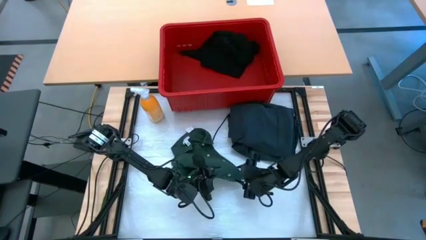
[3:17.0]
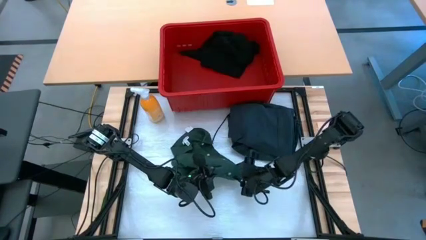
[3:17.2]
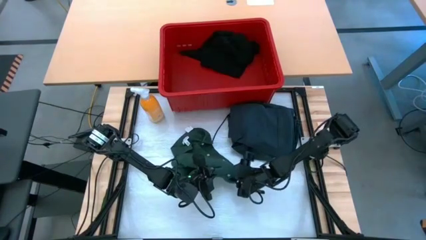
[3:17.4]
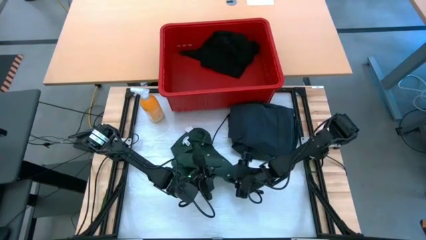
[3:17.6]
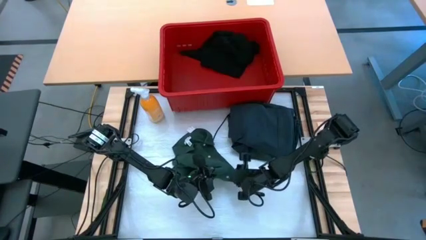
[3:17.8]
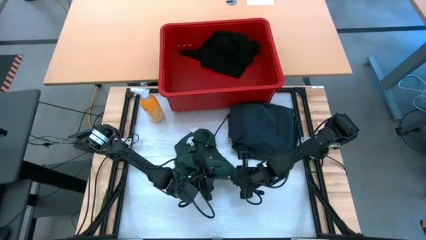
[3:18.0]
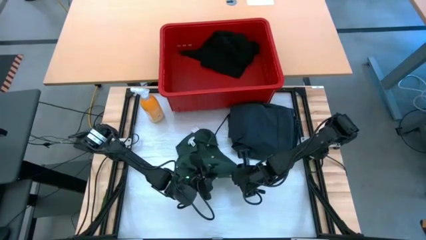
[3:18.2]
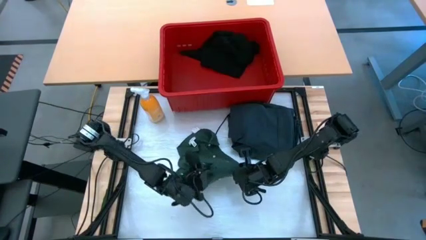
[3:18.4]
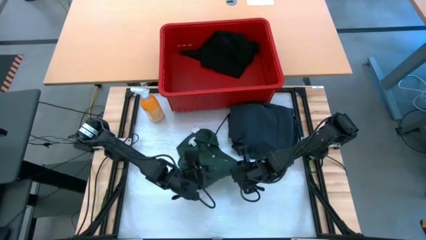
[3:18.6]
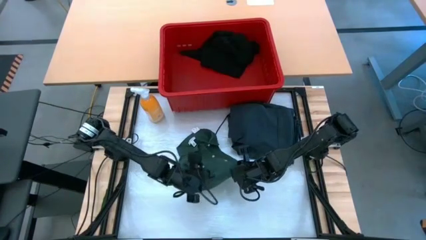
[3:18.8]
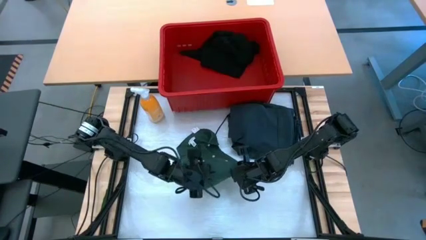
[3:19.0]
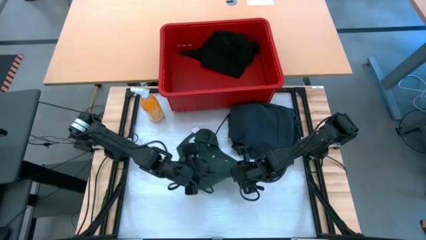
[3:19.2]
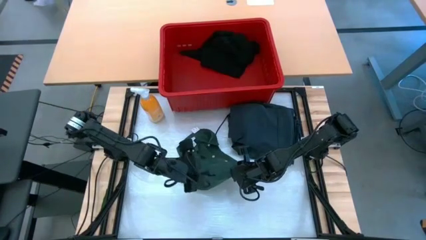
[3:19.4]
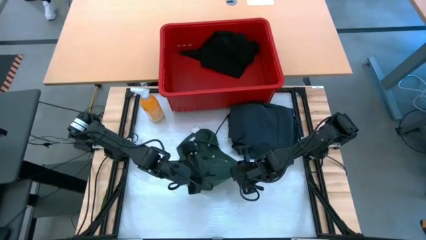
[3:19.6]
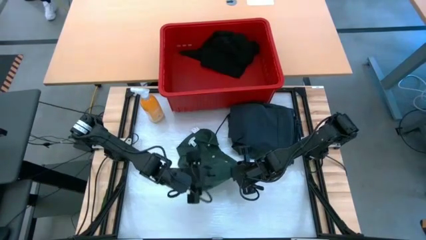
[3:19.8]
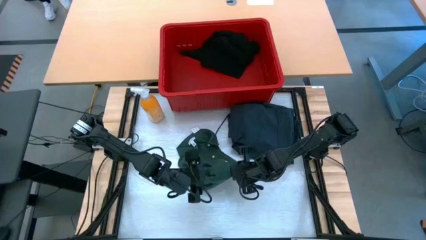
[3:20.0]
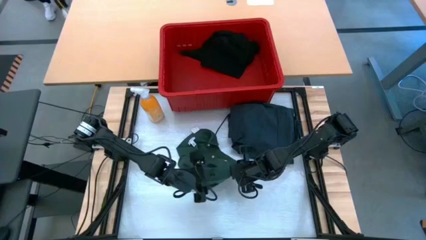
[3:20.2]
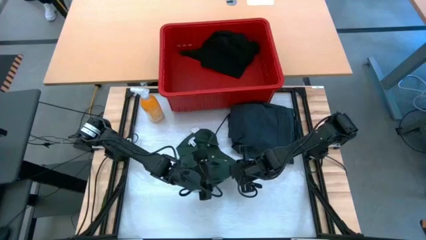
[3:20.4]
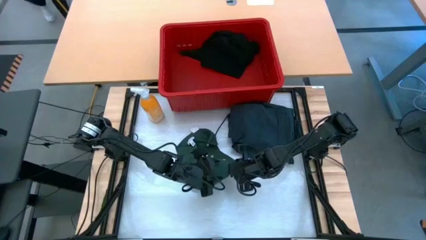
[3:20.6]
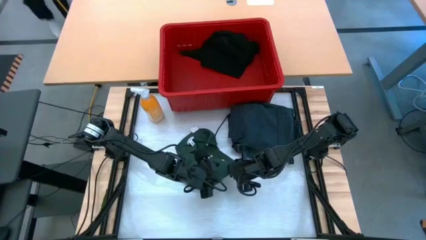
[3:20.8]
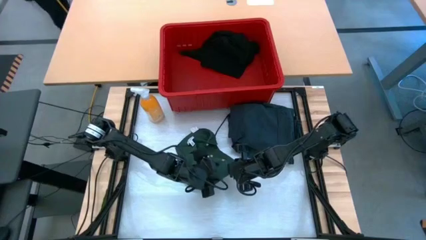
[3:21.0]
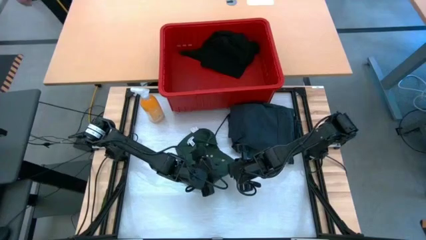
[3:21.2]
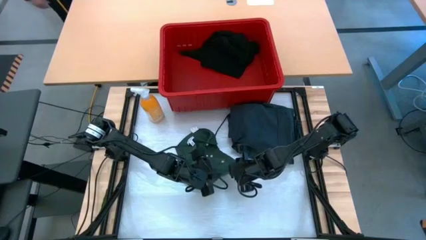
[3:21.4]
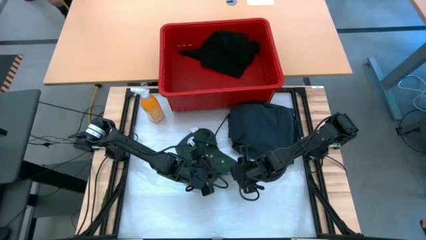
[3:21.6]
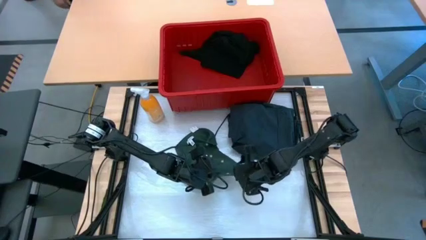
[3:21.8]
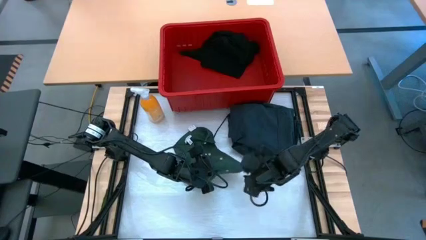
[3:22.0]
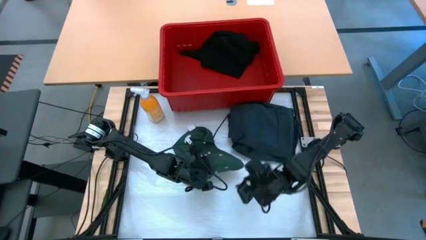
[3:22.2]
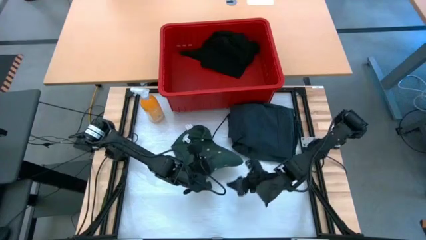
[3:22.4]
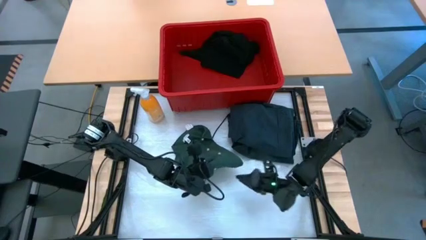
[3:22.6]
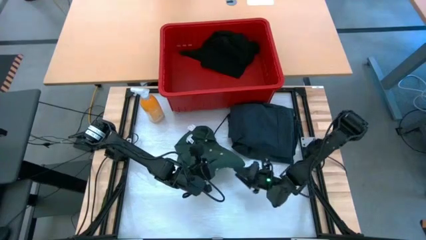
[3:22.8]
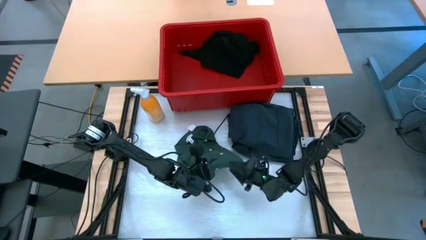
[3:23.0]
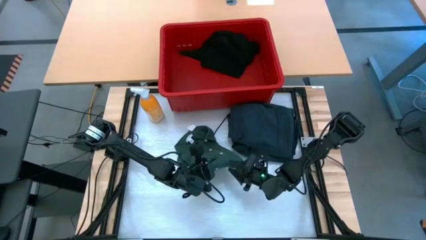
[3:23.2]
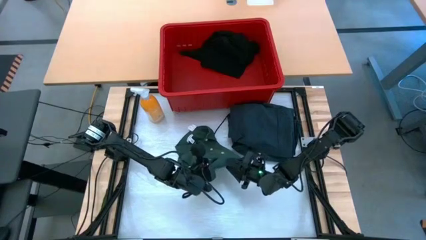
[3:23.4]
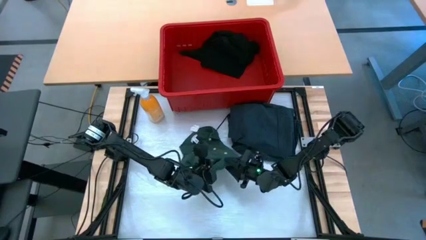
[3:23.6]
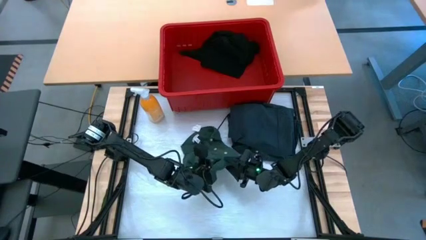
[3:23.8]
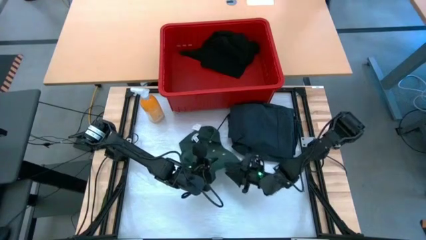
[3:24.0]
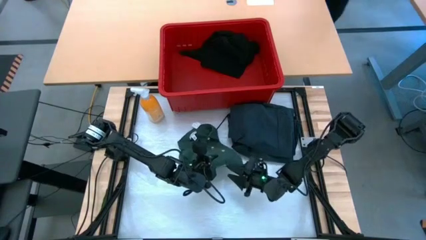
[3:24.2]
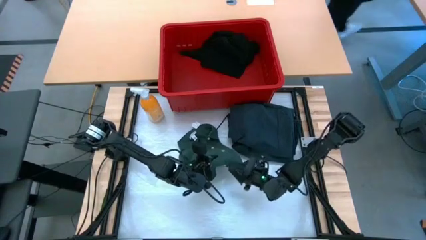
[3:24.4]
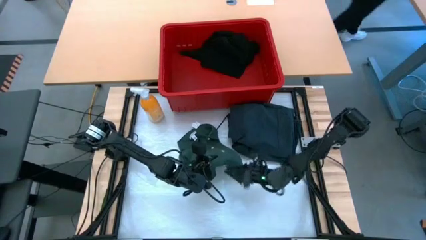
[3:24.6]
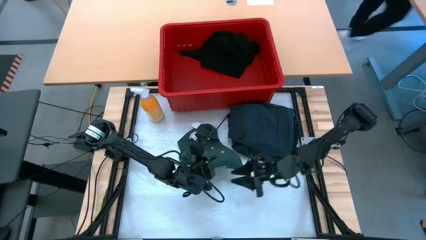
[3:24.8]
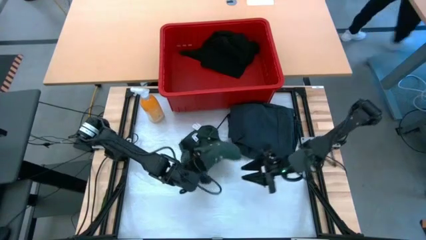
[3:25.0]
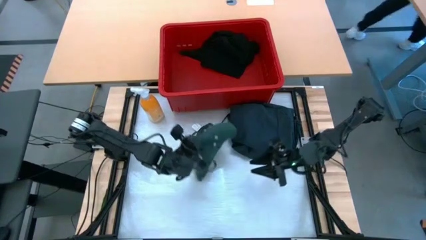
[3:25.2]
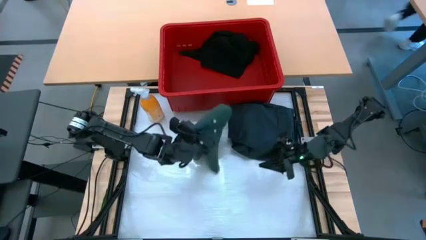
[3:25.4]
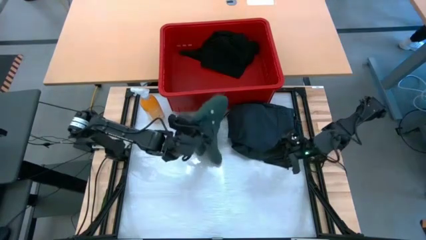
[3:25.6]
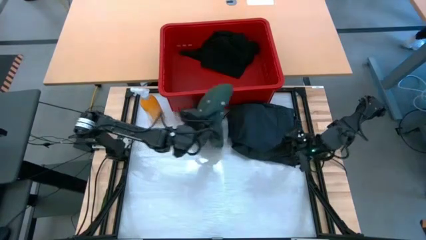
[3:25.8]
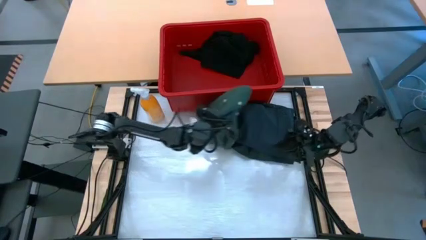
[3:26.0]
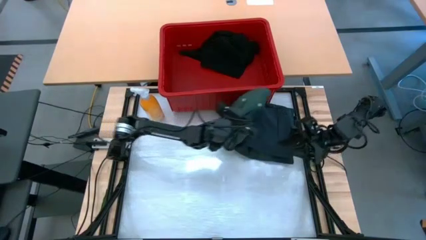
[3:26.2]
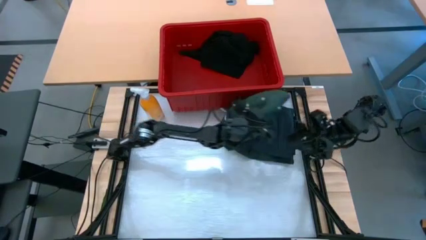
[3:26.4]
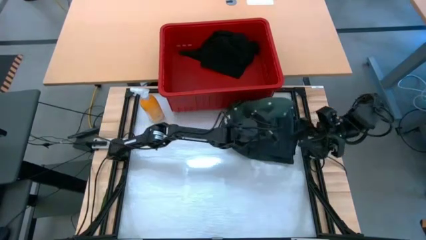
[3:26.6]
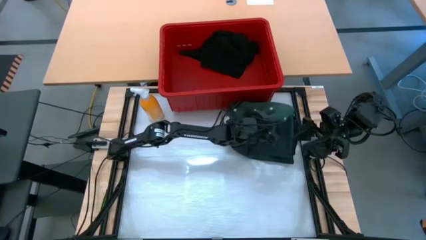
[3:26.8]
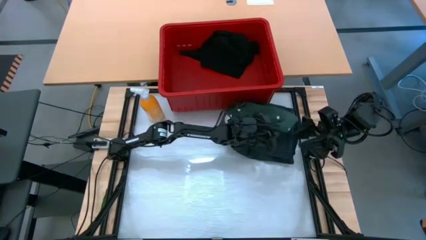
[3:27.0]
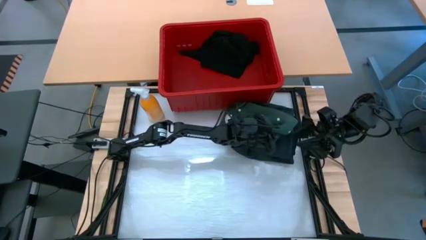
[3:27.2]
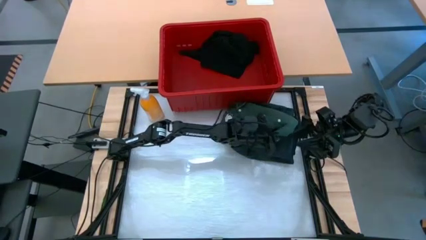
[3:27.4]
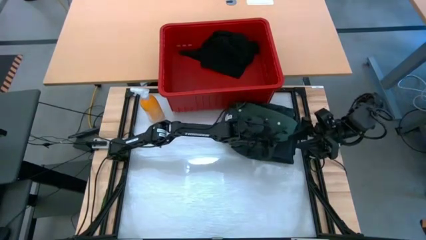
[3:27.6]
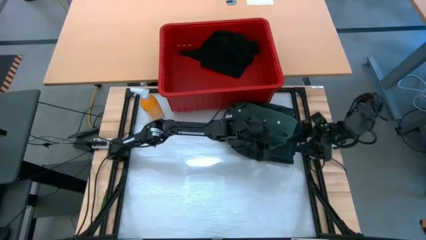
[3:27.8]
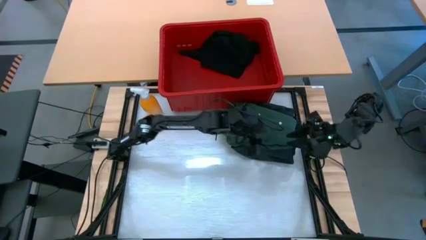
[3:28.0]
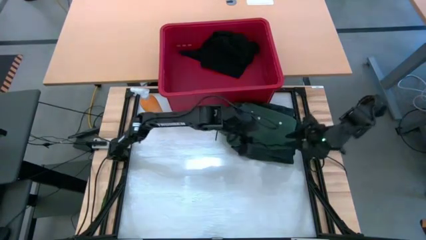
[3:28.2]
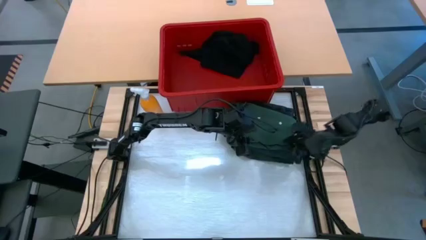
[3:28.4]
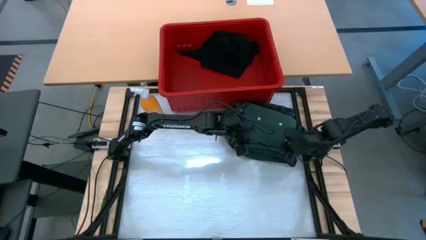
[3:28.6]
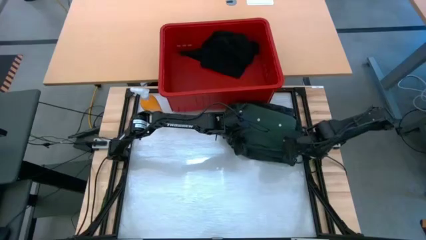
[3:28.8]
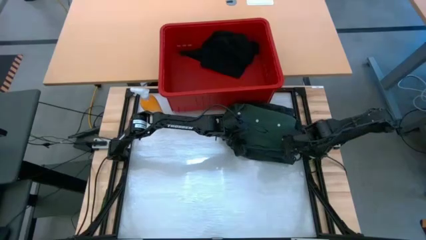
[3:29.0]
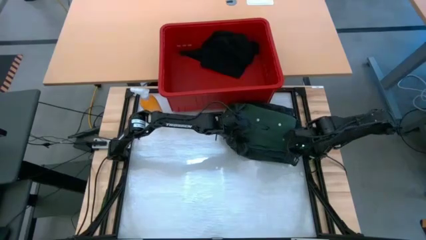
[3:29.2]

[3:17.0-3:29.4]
Task: Fold laundry
Stack the green shirt on top of the black shorts on the table

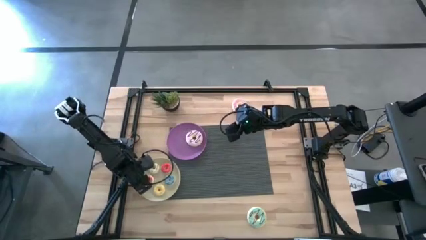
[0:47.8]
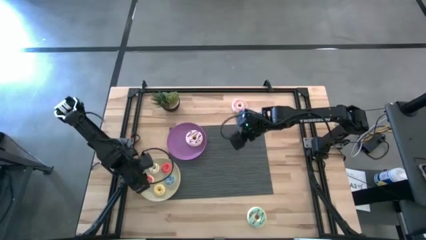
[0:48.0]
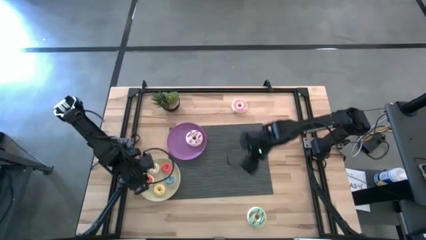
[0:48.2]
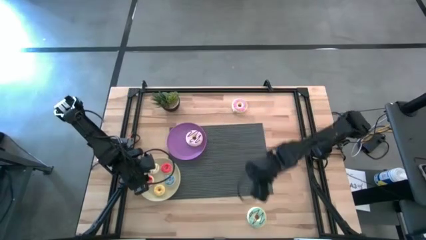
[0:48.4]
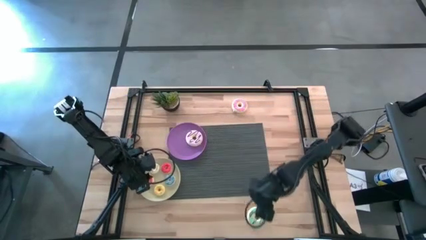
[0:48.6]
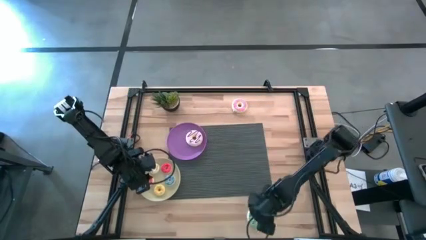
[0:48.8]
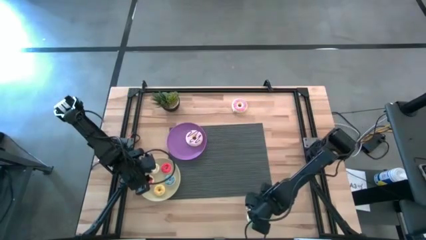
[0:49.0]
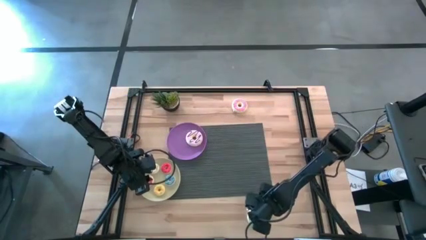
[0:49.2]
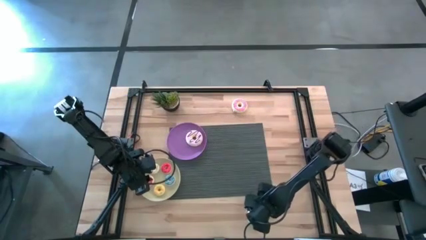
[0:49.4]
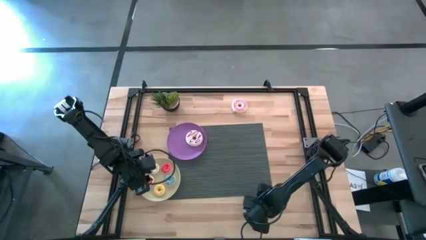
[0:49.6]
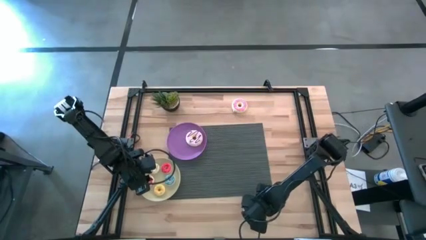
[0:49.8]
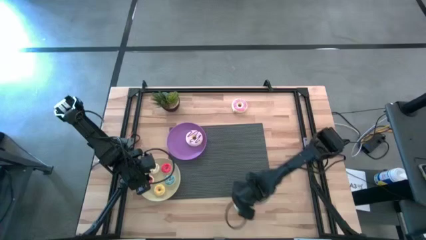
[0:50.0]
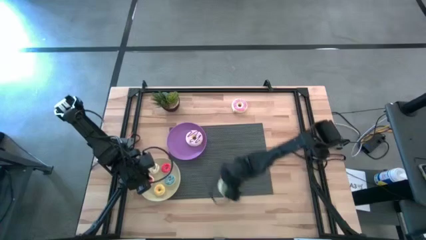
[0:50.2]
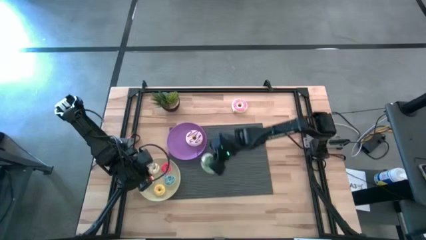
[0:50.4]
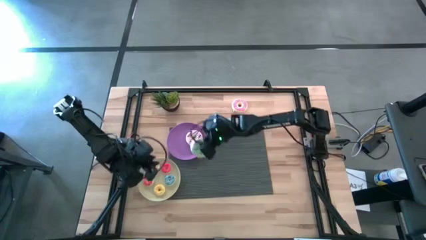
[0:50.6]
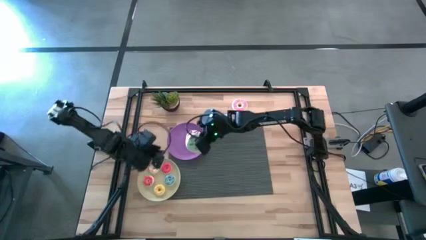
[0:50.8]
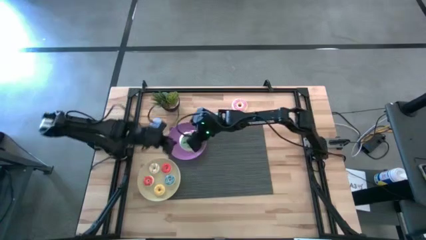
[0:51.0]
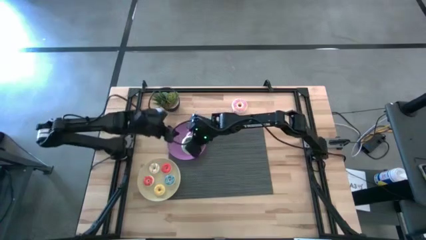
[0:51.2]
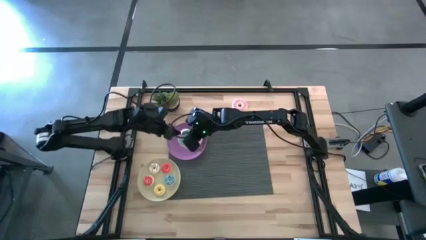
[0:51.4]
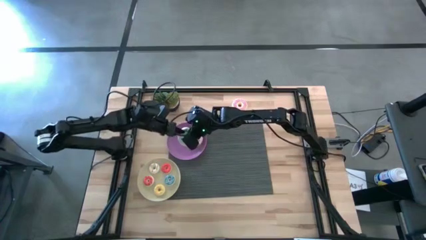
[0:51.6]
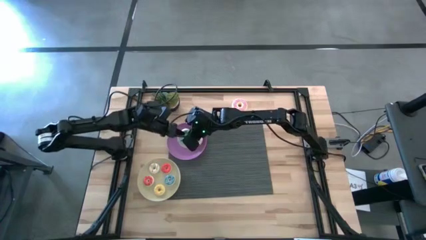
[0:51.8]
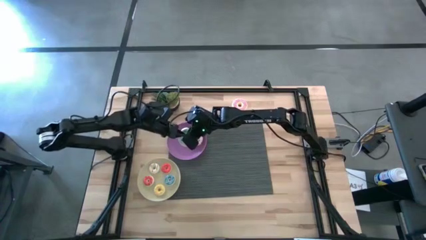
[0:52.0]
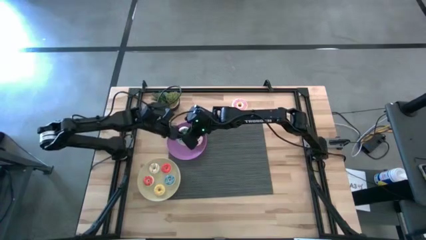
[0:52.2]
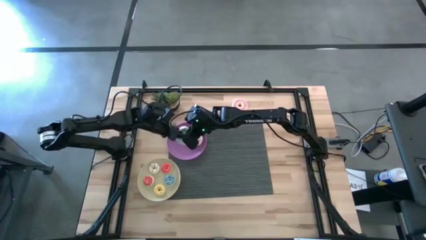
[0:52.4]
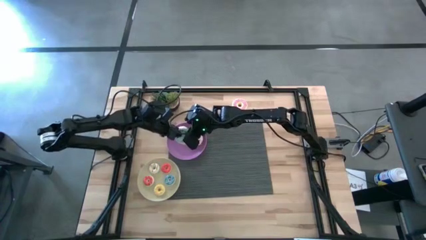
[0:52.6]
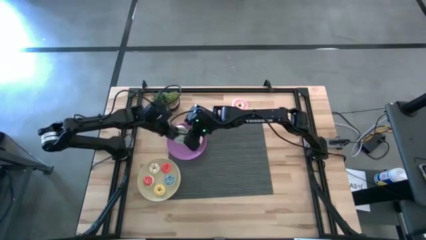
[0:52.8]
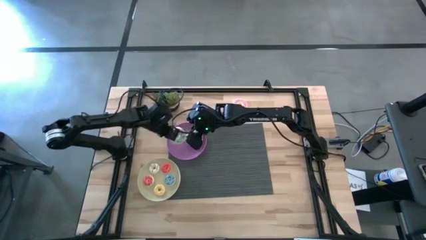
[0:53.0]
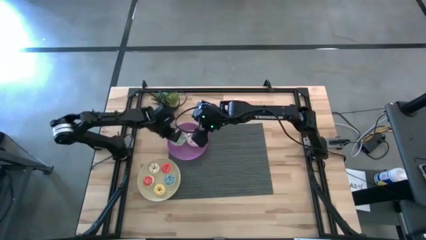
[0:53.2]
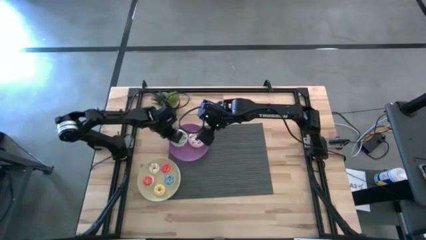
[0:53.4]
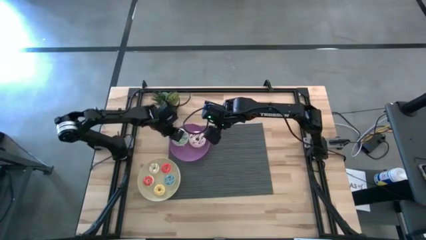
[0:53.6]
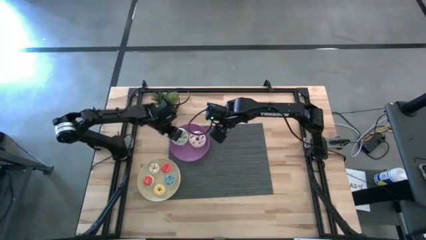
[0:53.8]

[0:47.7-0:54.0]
Task: Pick & Place donuts
Put the big blue donut on the purple plate
